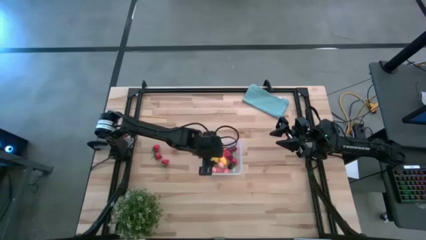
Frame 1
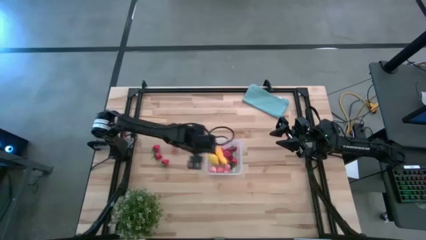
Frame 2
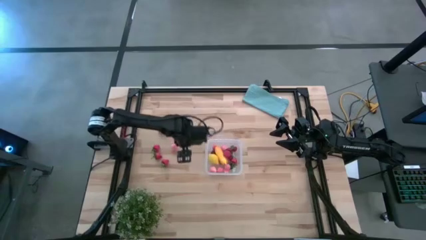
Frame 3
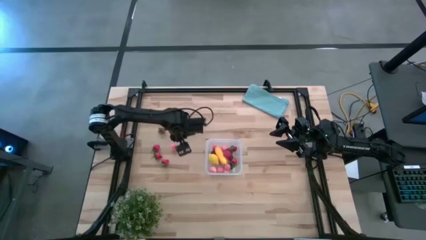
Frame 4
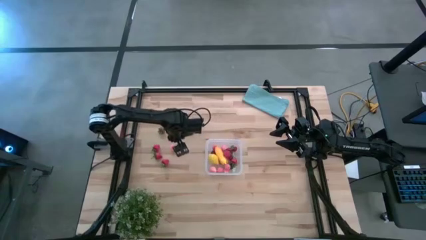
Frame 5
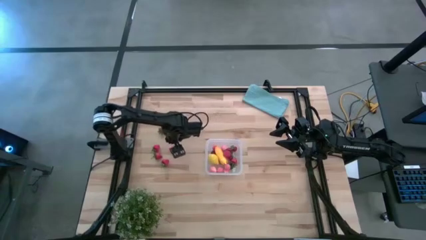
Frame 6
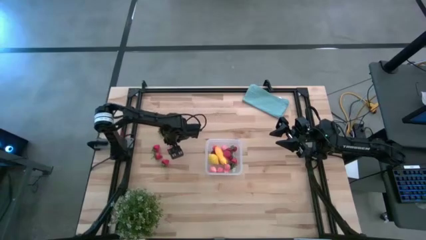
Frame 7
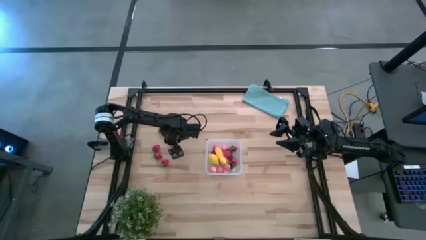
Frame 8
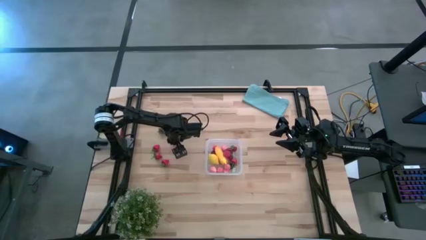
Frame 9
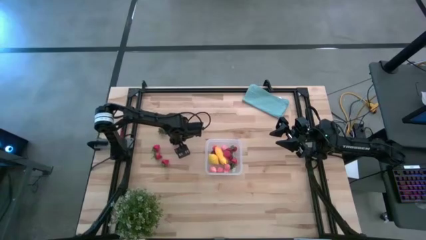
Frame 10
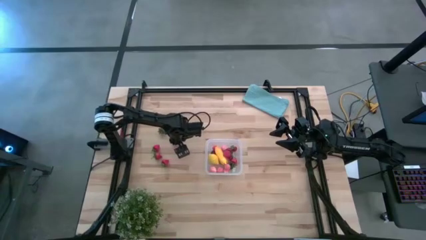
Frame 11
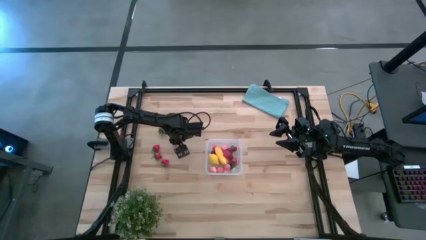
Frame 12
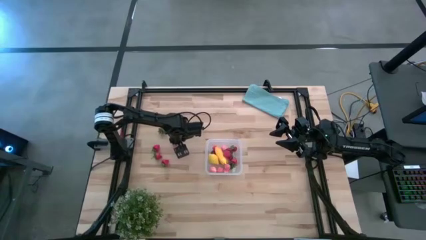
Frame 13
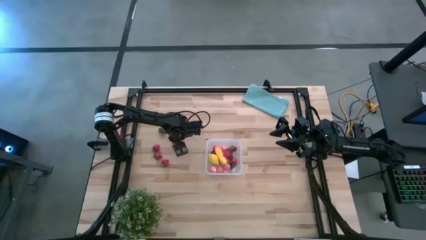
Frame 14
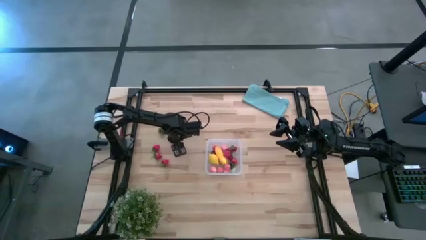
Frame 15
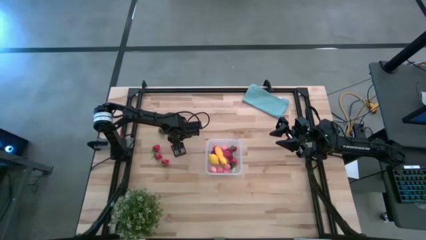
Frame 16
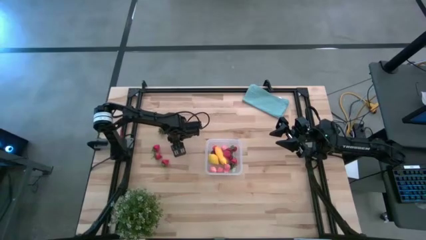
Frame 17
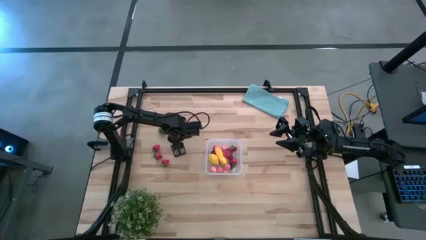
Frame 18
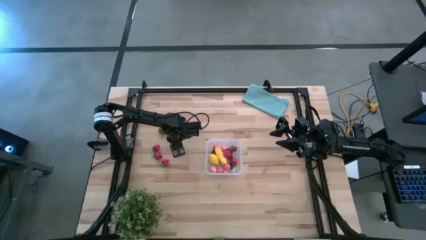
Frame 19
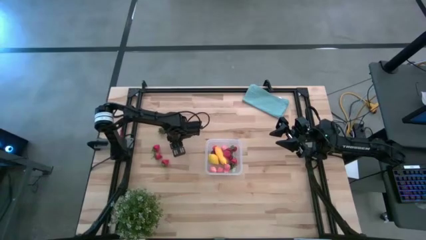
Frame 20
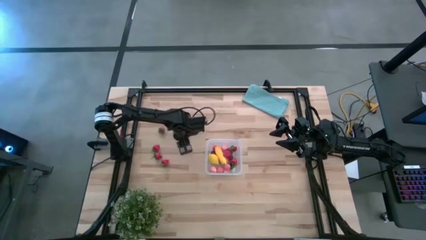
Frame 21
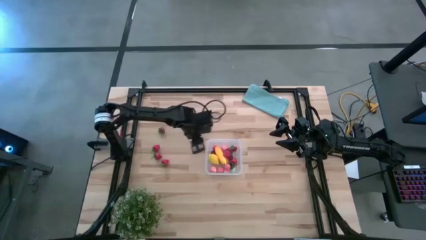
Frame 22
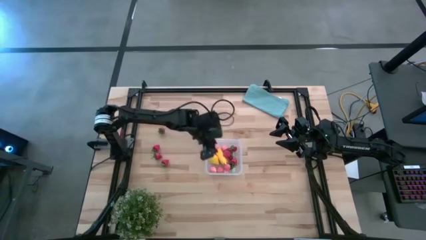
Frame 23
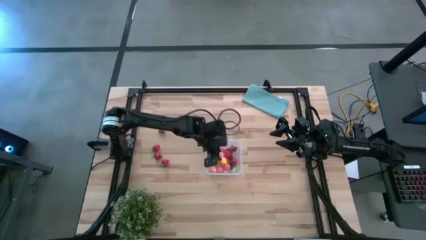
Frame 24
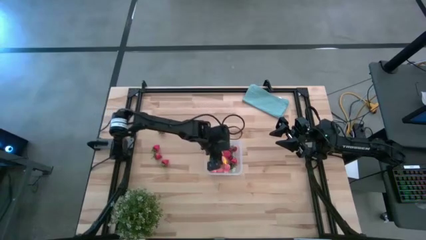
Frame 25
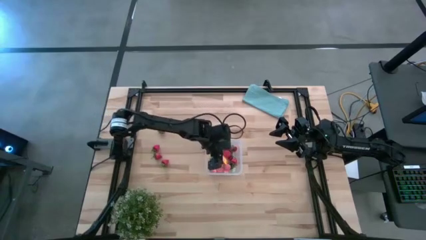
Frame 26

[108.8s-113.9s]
Task: Pick and placing Produce into tupperware
Put the pink peach into the transparent bin

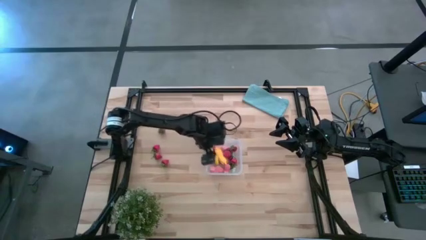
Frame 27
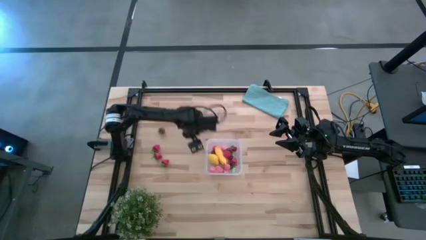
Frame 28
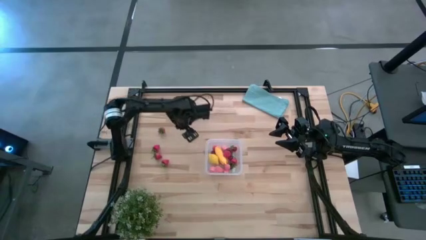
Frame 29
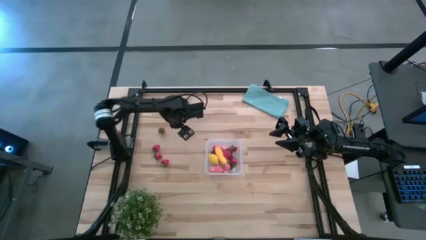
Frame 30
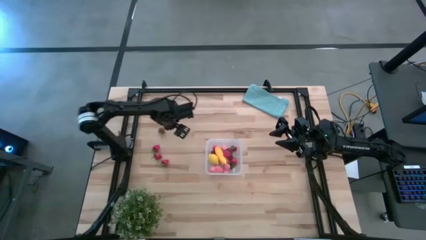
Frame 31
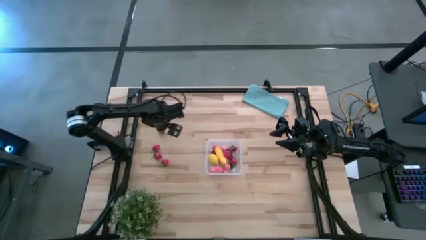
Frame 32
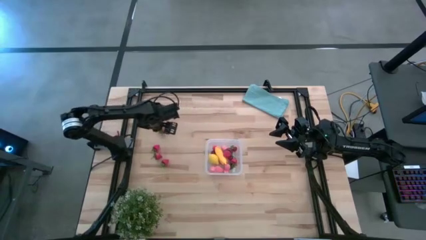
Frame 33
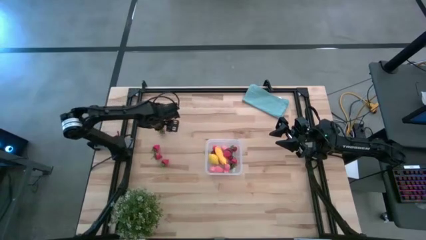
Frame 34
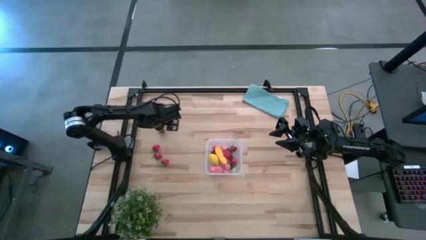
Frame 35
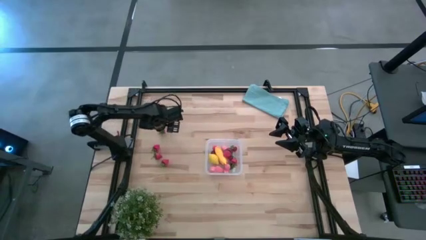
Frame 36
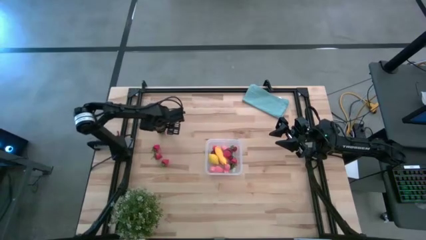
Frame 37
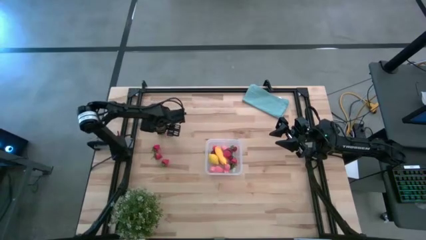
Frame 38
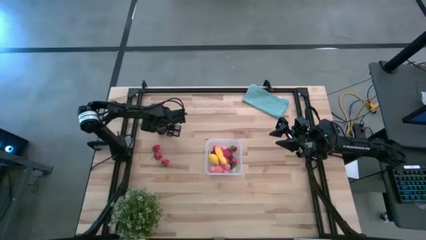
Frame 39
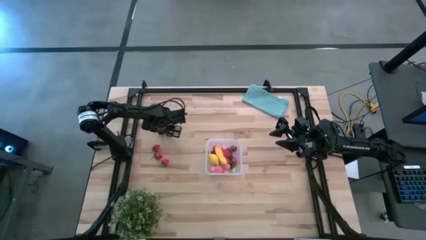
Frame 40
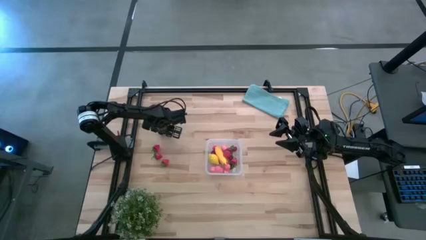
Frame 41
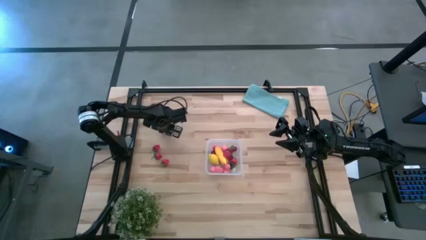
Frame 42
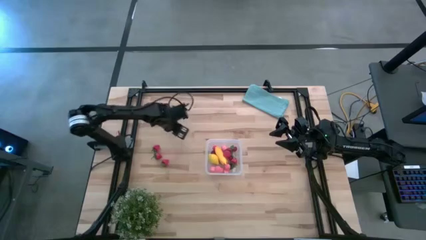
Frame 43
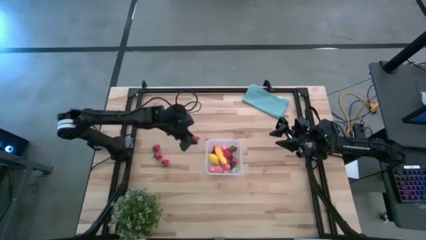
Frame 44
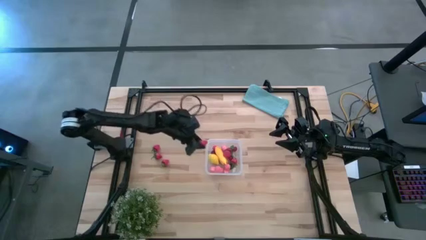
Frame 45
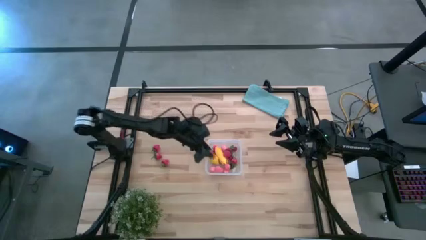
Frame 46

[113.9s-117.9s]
Put the red strawberry into the transparent bin

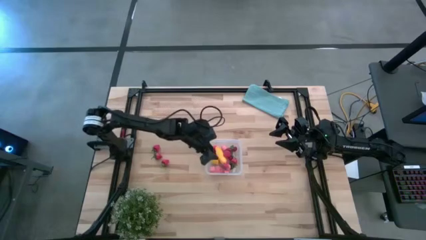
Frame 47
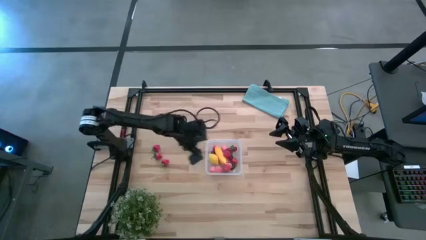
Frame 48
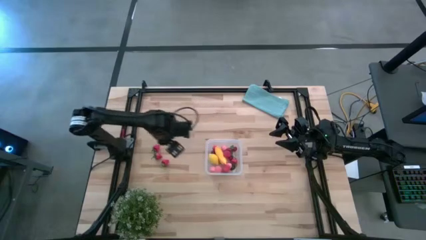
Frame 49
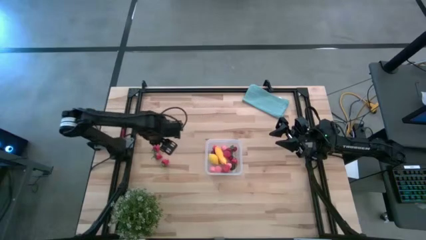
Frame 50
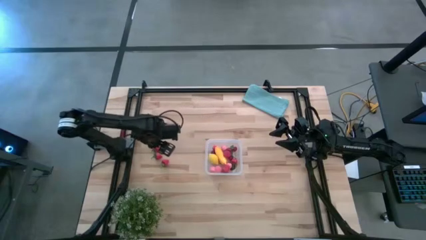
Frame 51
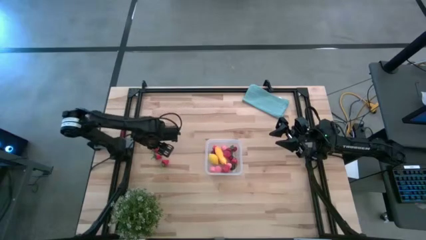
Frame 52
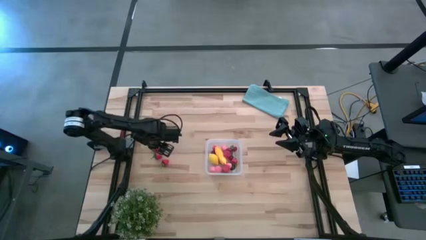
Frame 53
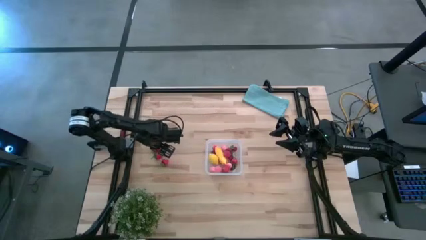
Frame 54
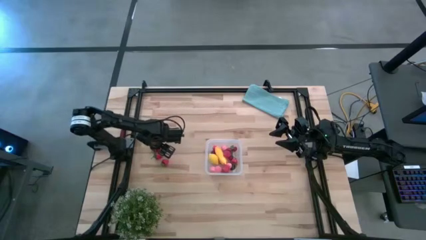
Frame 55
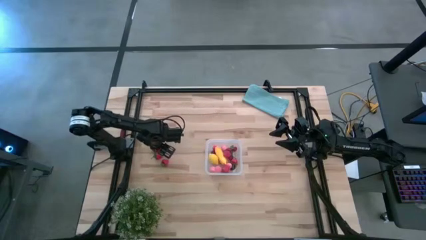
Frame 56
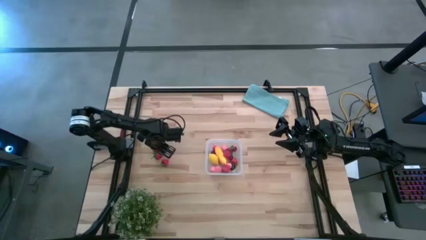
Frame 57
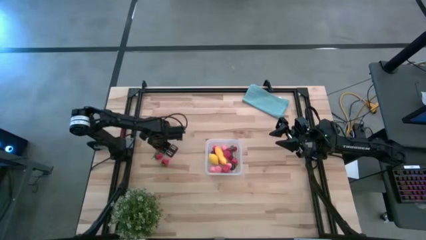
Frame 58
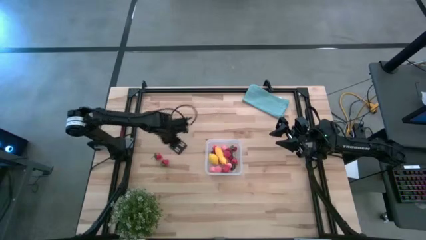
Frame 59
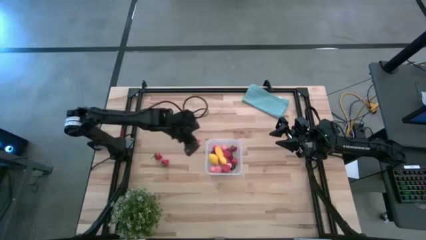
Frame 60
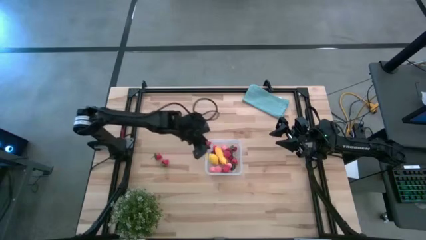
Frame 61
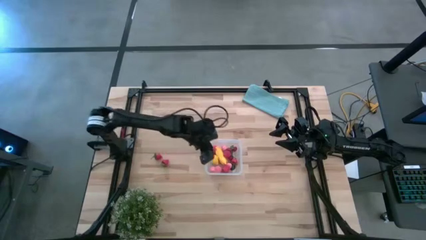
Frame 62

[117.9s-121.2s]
Put the red strawberry into the transparent bin

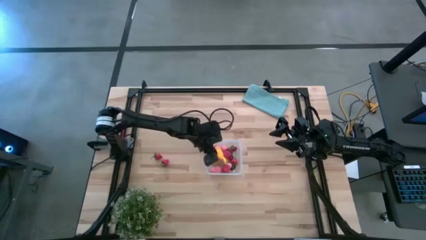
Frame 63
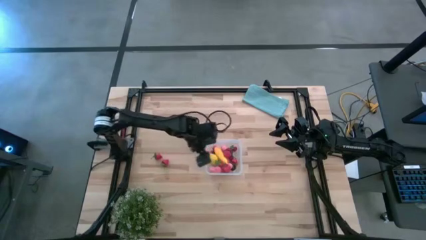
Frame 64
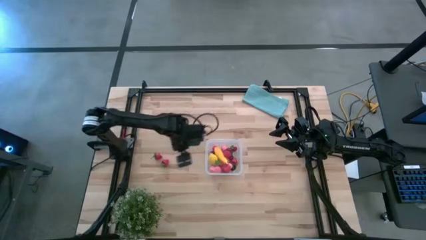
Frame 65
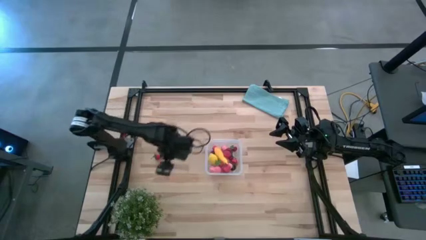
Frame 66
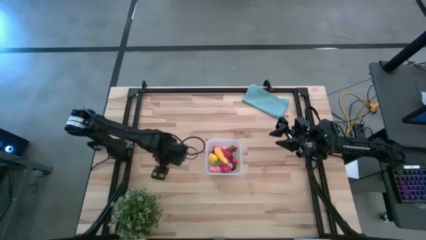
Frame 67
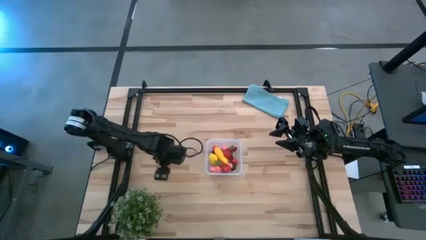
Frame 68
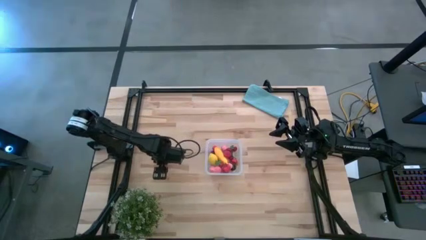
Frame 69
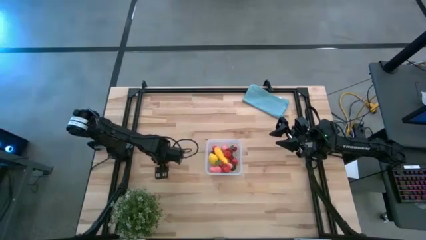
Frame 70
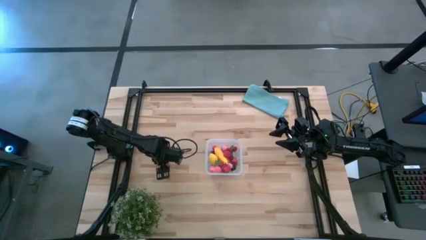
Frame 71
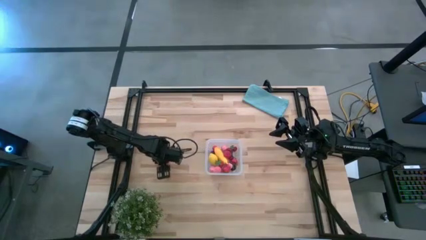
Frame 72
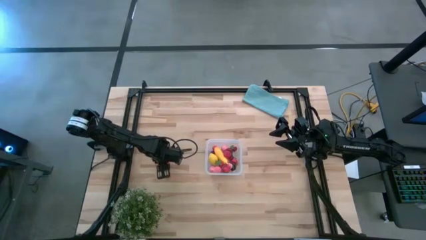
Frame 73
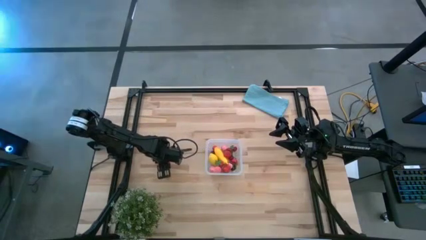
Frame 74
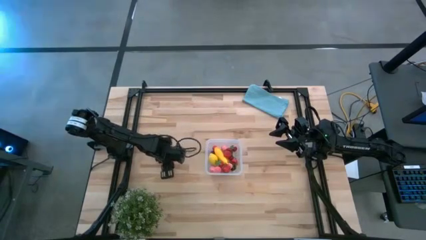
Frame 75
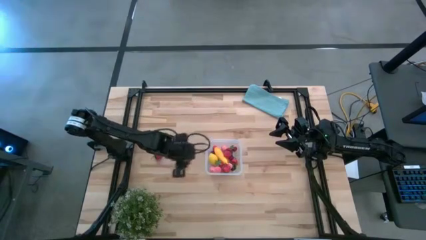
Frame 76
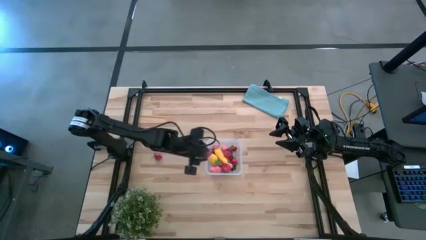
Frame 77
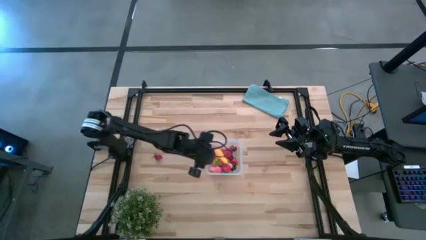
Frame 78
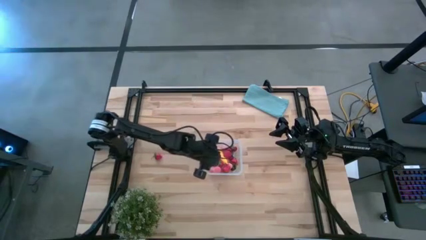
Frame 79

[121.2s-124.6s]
Put the red strawberry into the transparent bin

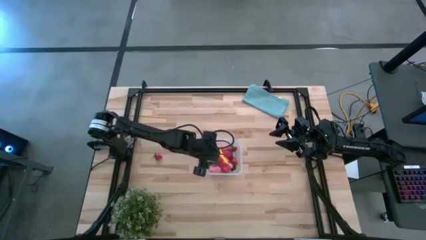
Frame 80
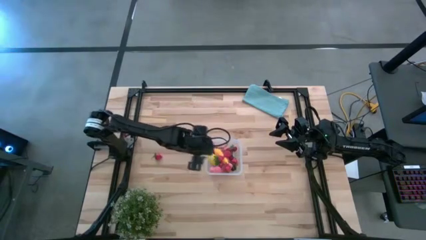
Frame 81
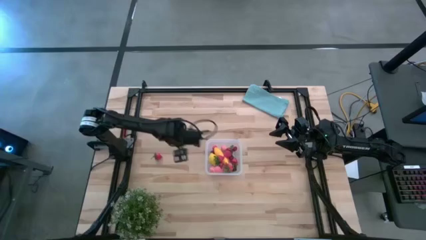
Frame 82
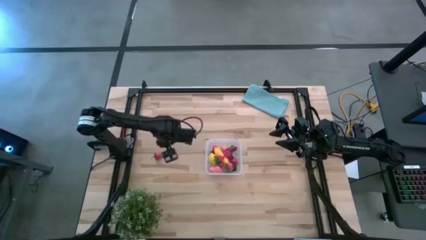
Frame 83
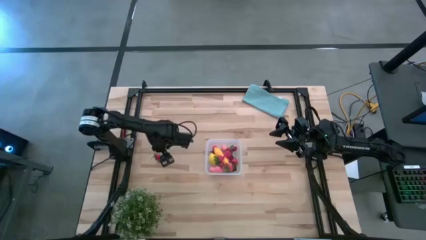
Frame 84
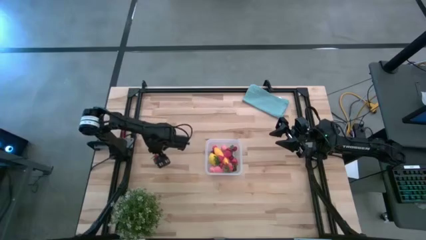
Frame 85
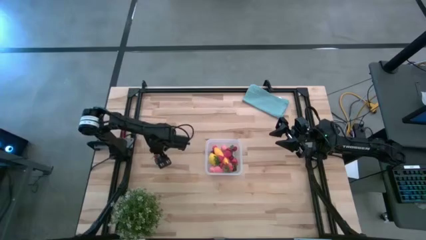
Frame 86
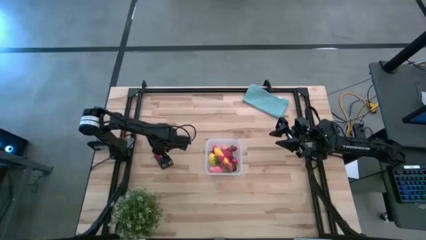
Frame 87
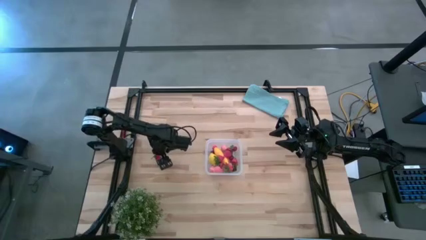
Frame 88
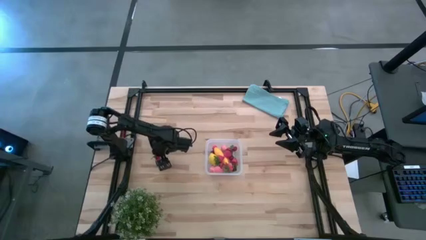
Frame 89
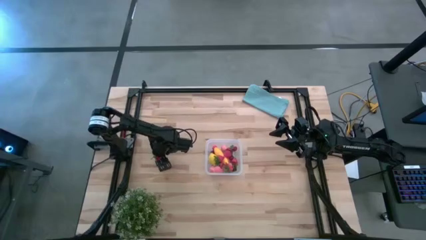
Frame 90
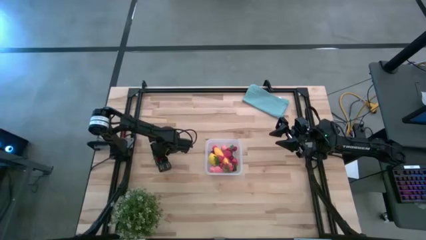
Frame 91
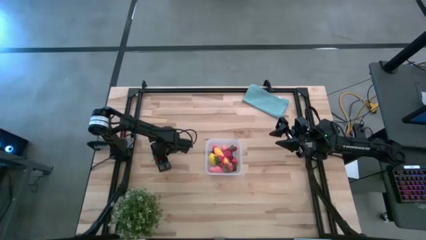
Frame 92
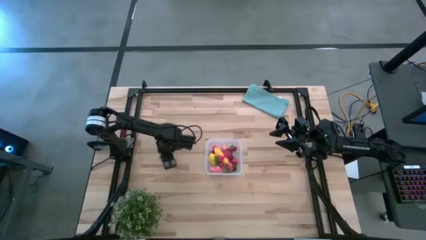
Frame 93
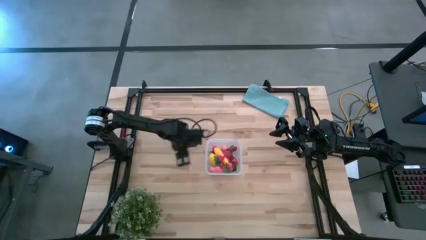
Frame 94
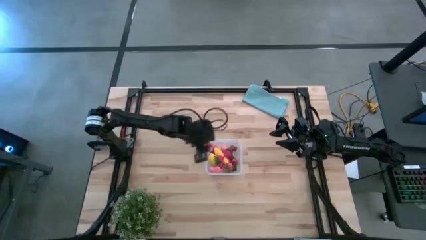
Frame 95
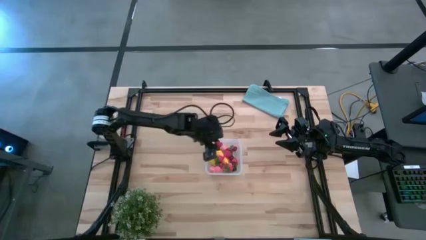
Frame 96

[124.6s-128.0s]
Put the red strawberry into the transparent bin
